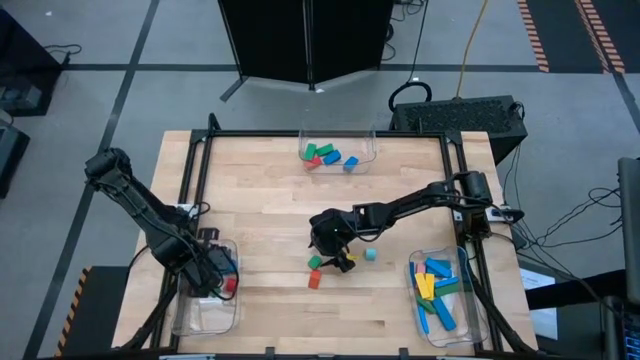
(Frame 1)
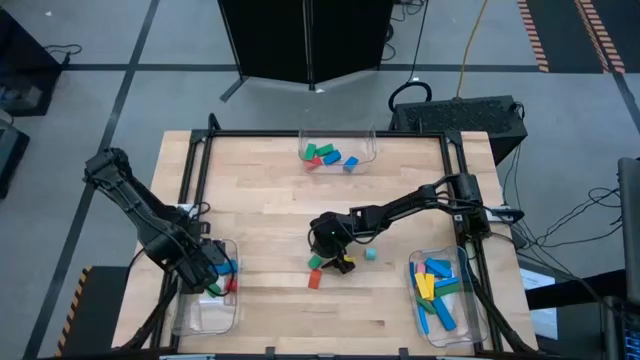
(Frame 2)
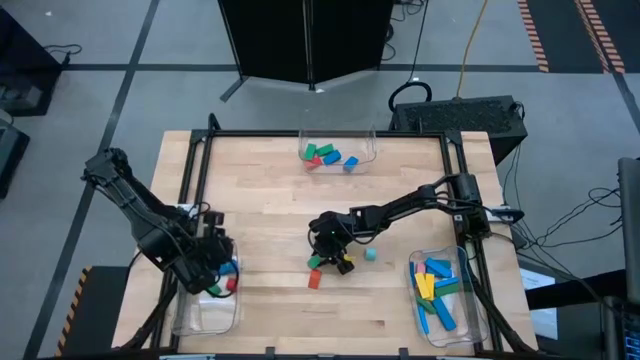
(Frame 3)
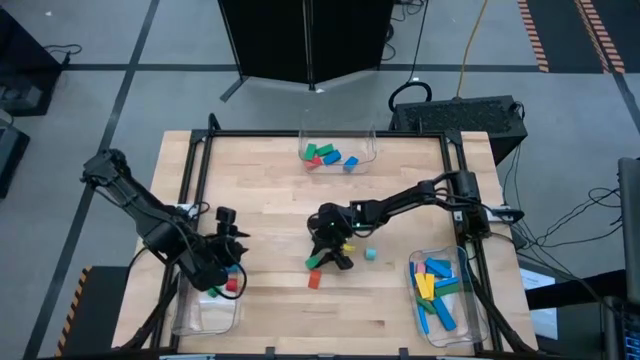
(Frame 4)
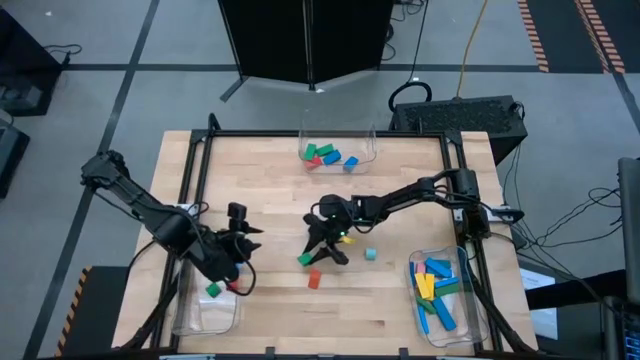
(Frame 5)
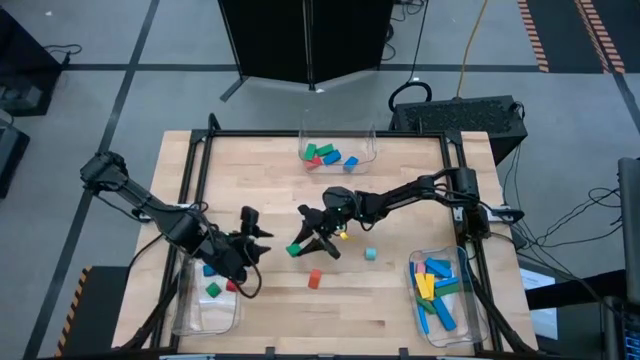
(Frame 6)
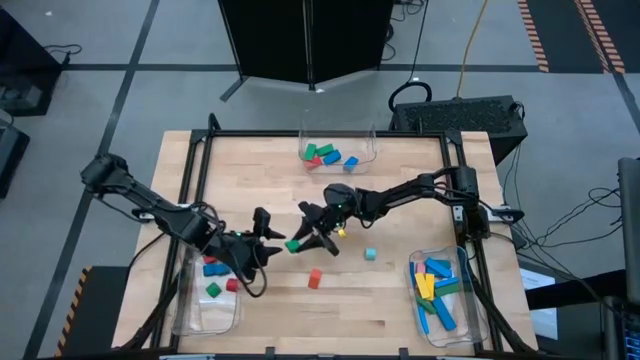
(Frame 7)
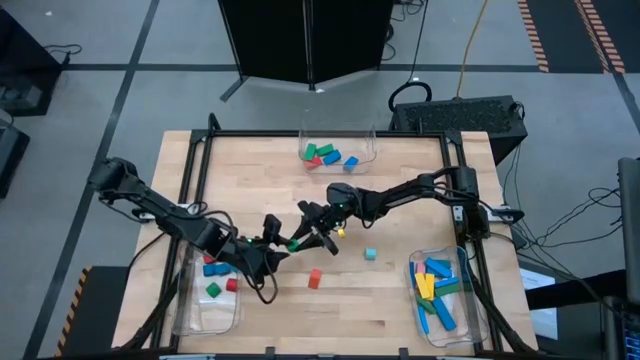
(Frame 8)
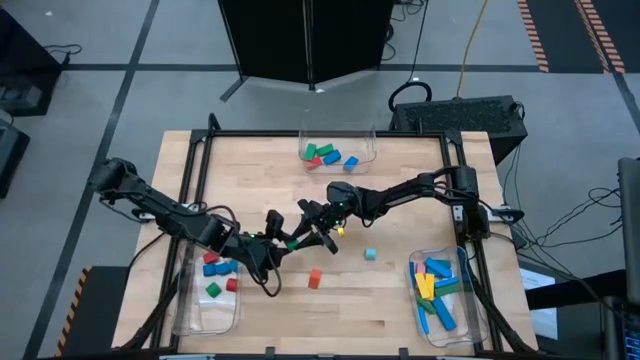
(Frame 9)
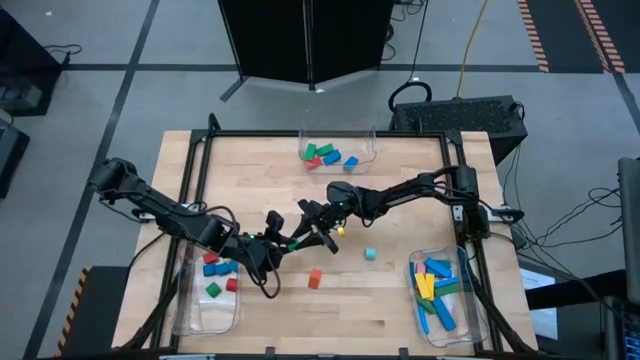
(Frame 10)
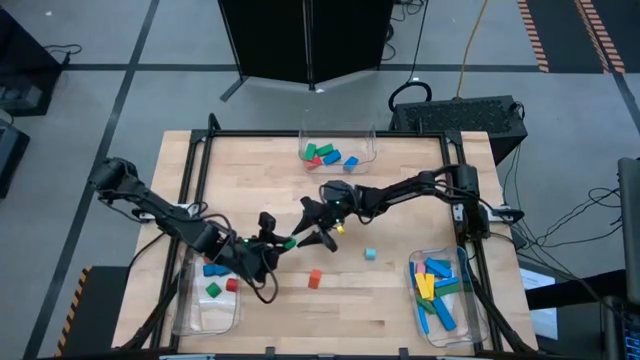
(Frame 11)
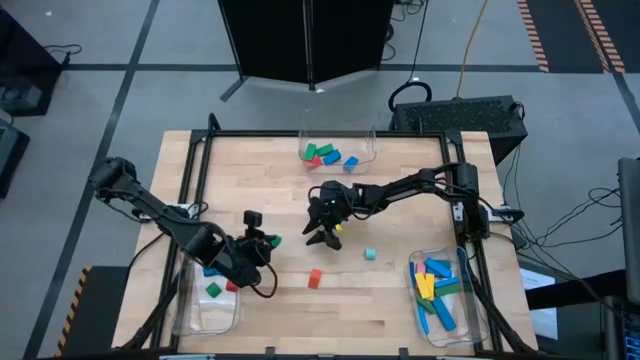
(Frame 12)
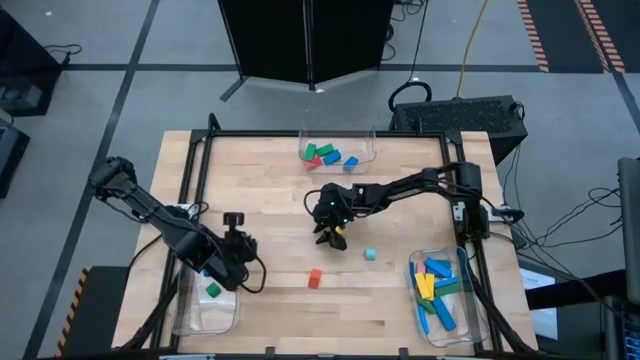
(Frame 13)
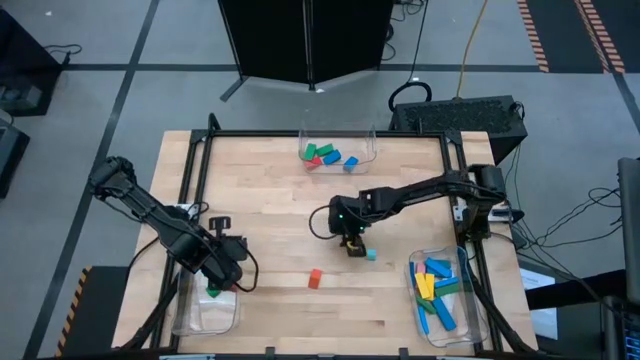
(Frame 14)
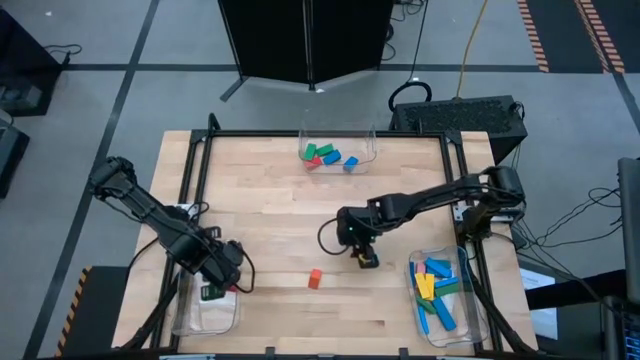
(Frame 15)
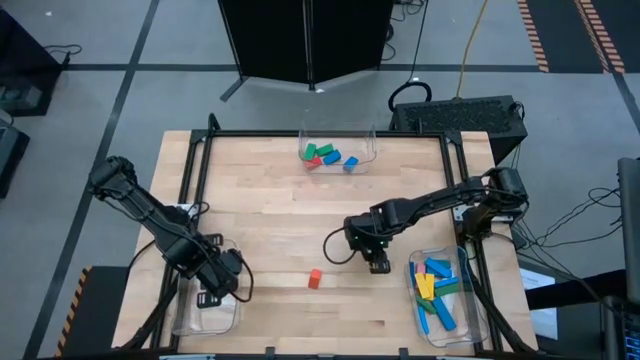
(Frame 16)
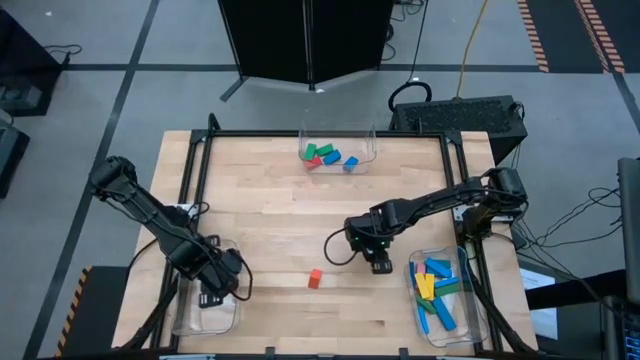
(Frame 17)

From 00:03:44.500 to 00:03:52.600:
Task: Sort blocks by size
Put the green half circle block into the bottom left transparent bin

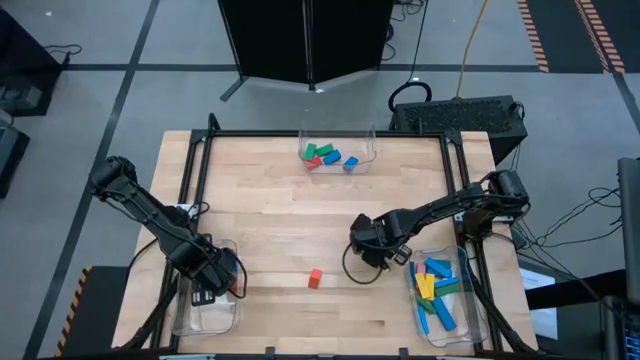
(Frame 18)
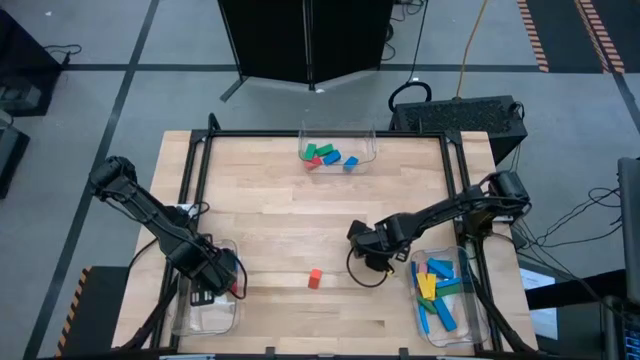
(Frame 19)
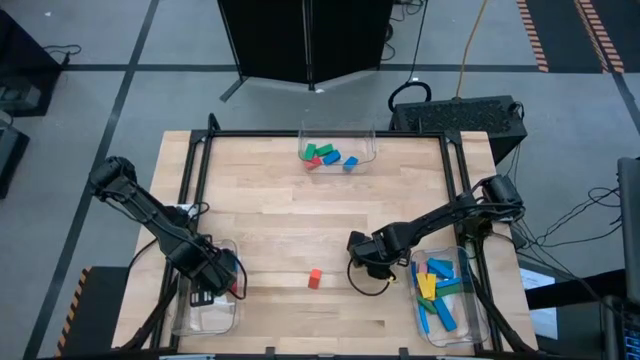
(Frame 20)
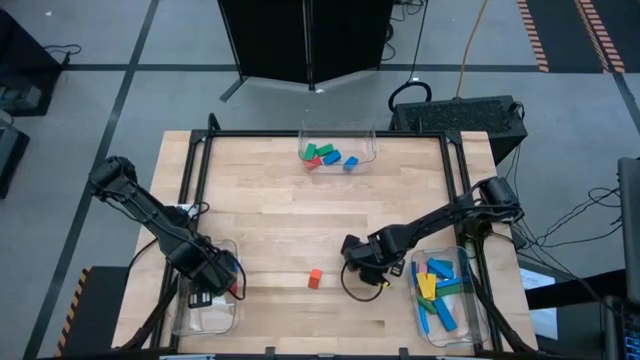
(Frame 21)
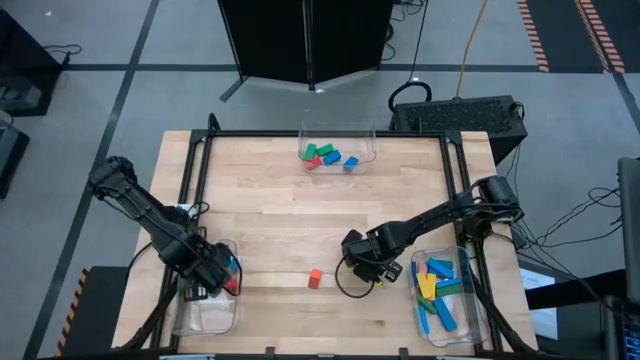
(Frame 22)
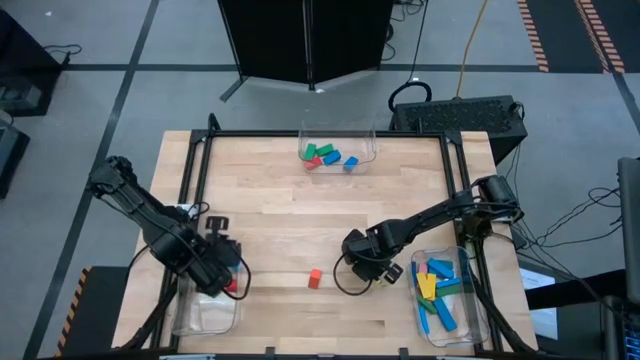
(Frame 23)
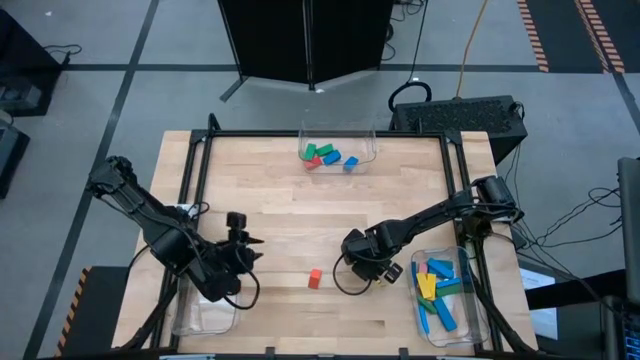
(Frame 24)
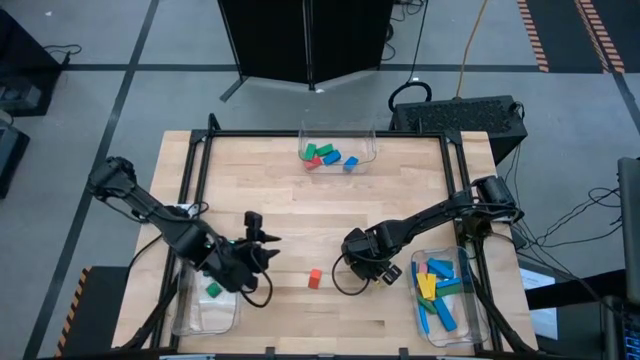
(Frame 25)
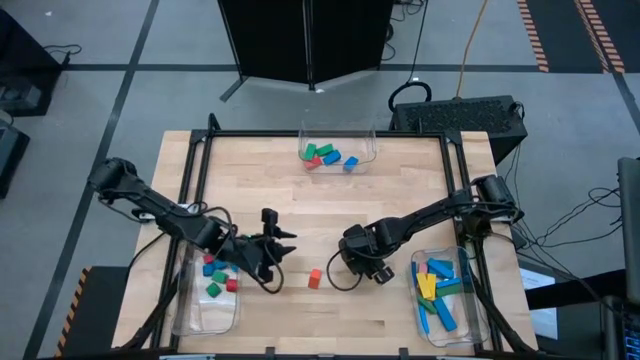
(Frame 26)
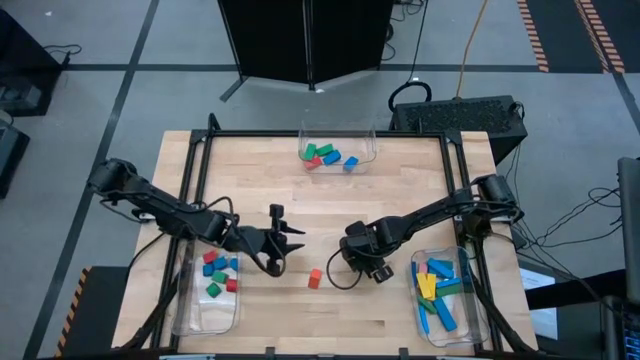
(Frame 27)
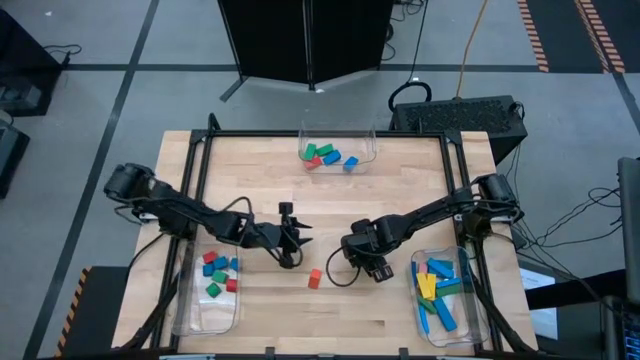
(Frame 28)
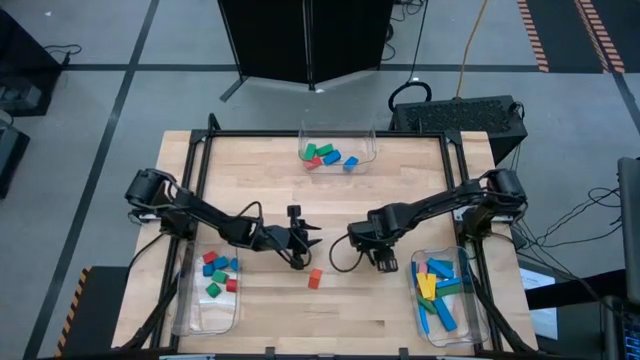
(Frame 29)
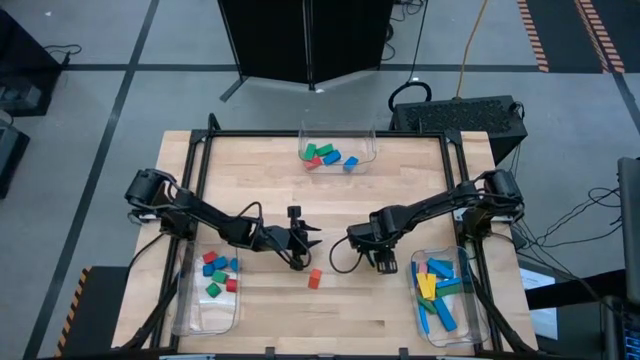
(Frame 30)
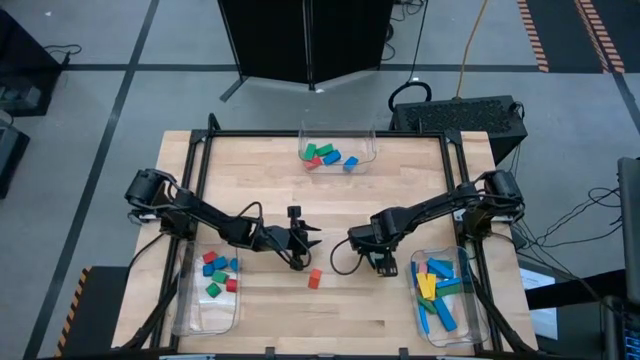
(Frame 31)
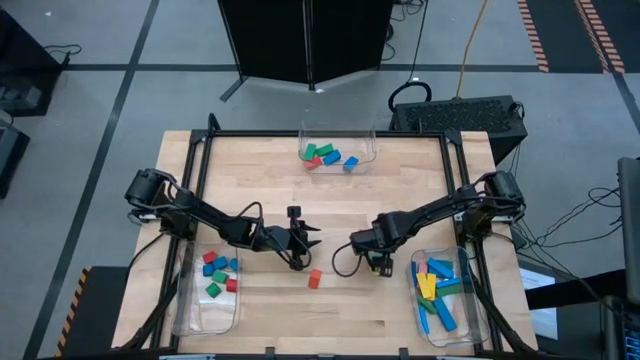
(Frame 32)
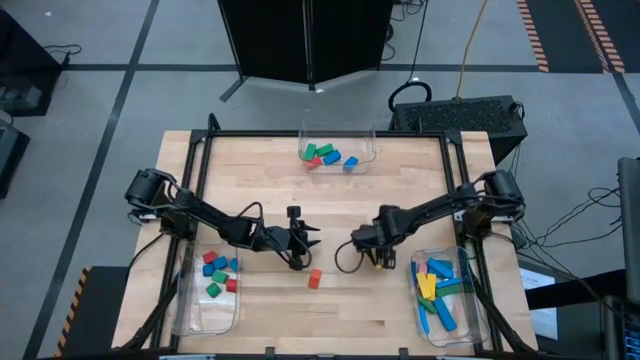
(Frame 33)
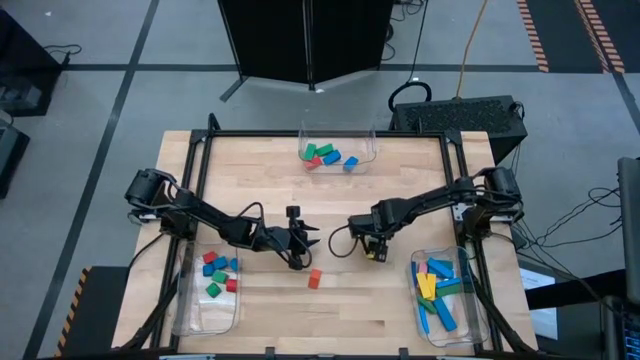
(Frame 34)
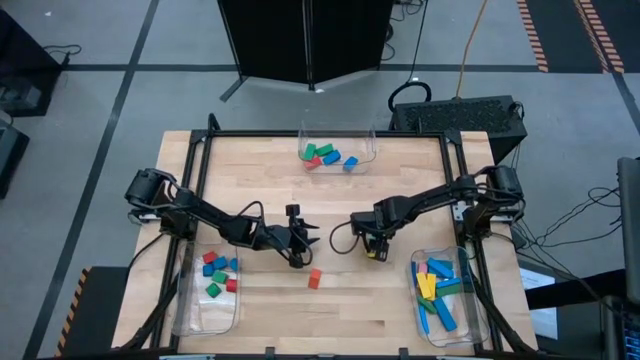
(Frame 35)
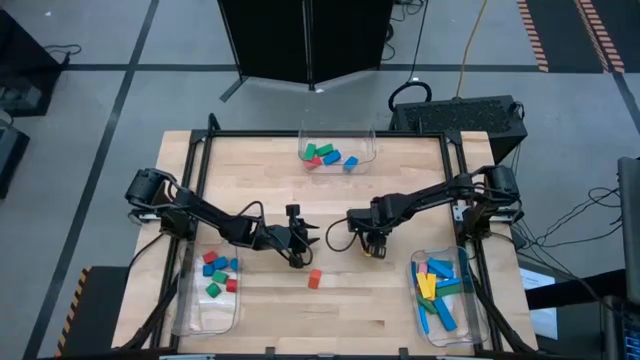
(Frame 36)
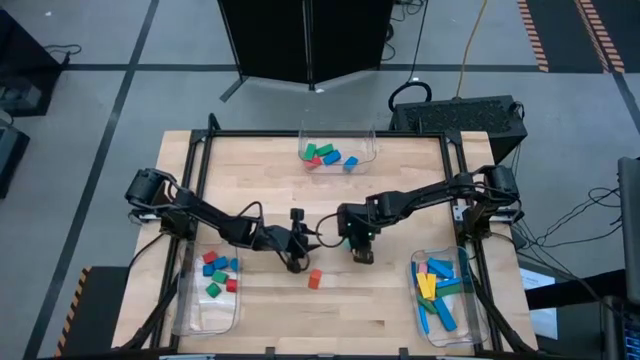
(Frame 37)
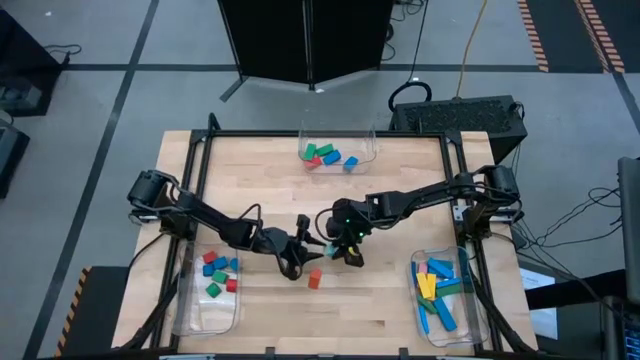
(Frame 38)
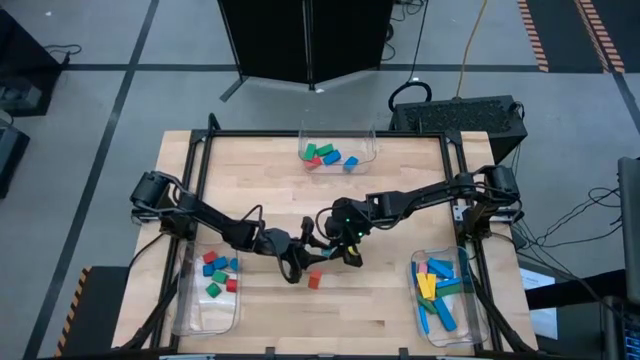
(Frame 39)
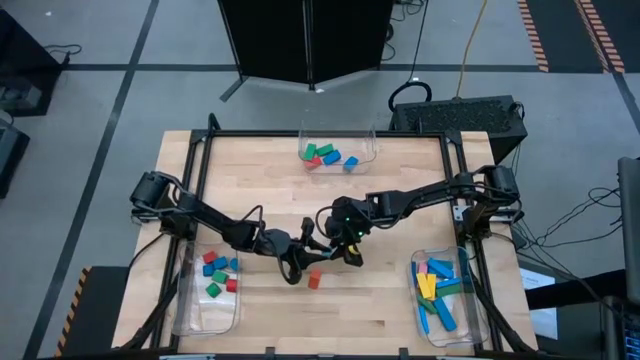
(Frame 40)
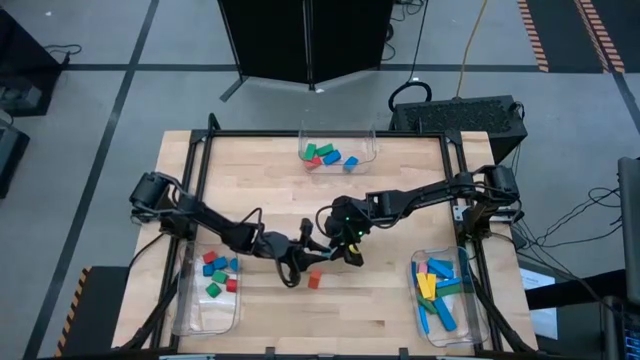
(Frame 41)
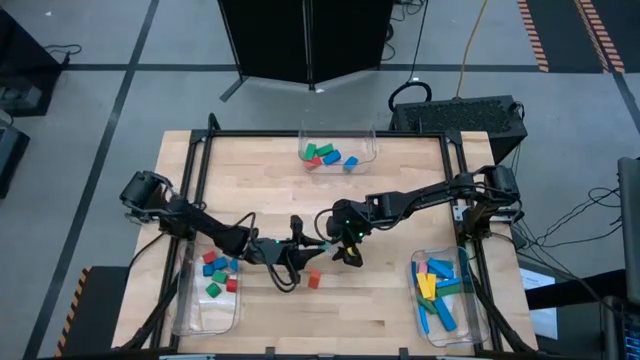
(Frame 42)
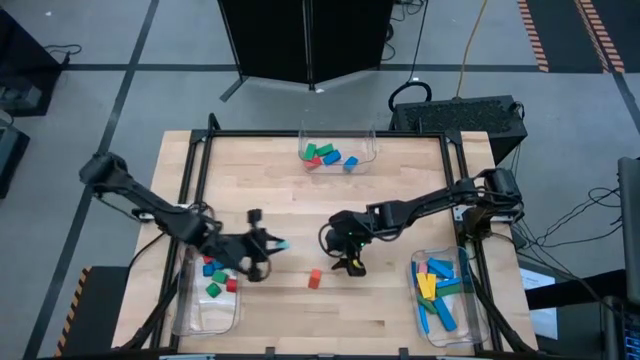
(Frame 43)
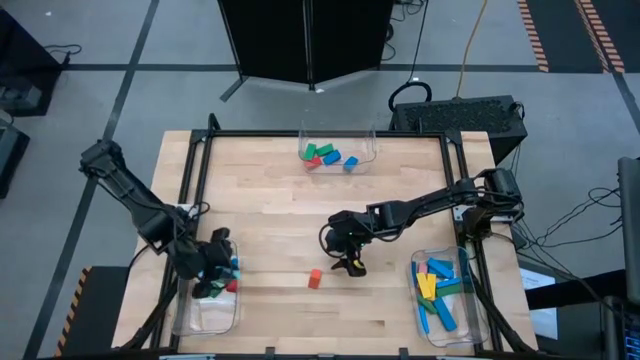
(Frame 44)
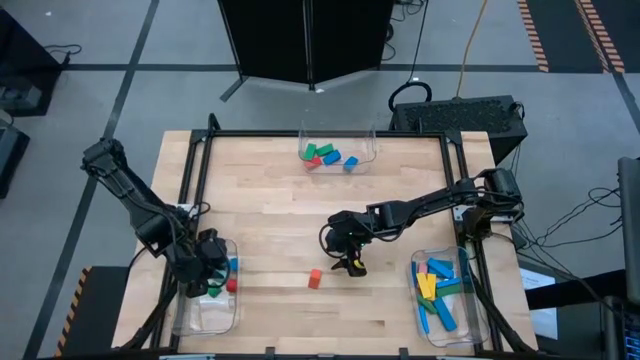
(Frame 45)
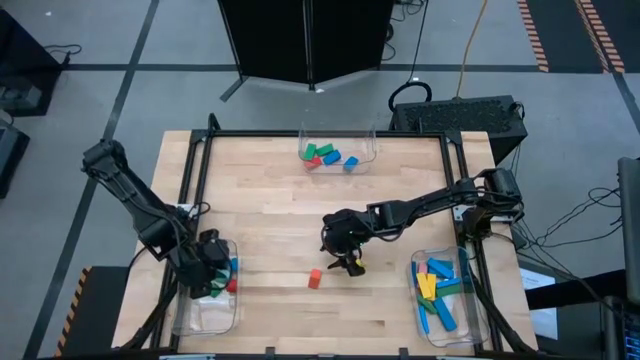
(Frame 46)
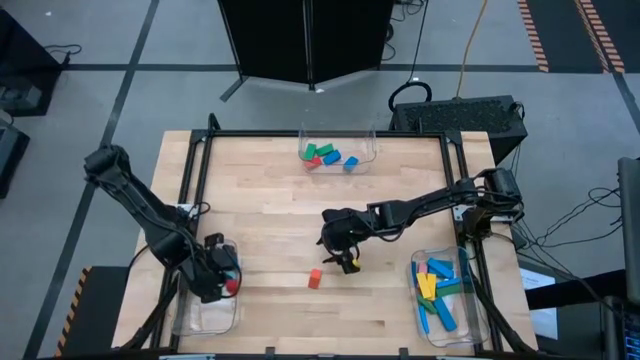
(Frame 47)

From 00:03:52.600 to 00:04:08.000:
Put the light blue half circle block into the bottom left transparent bin
